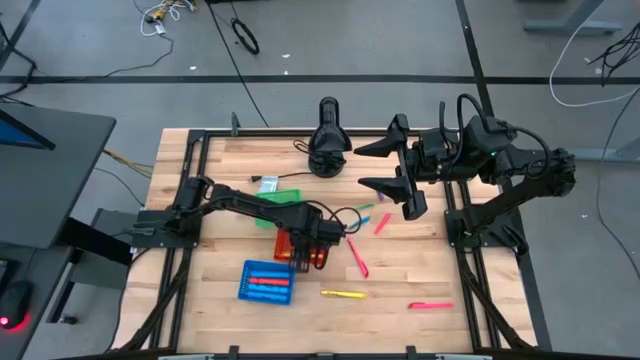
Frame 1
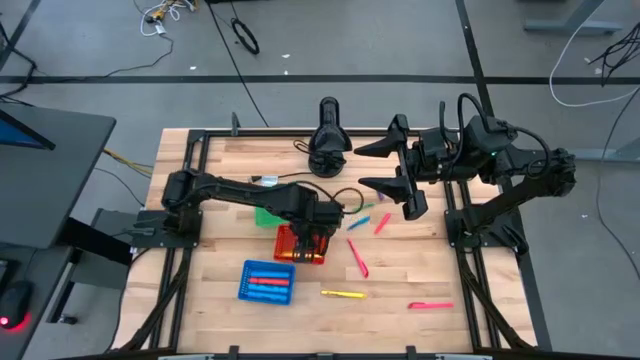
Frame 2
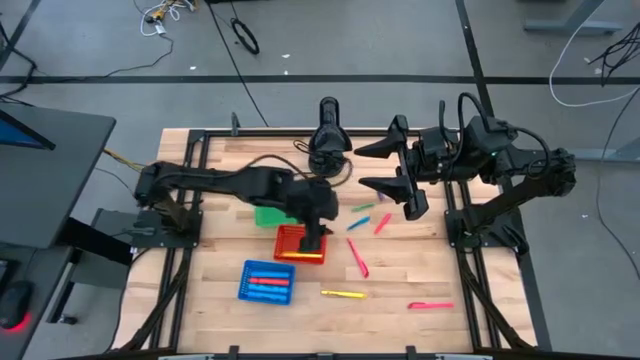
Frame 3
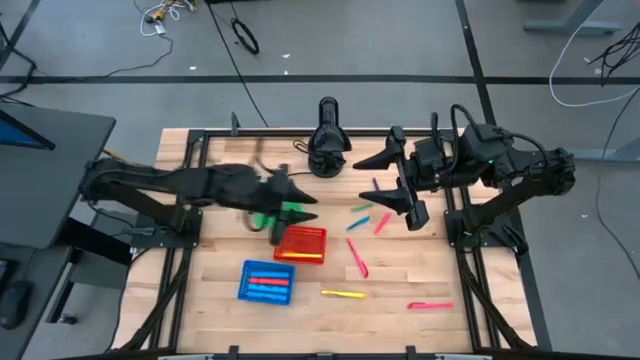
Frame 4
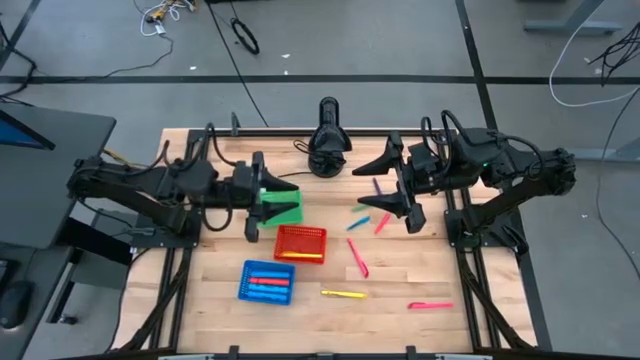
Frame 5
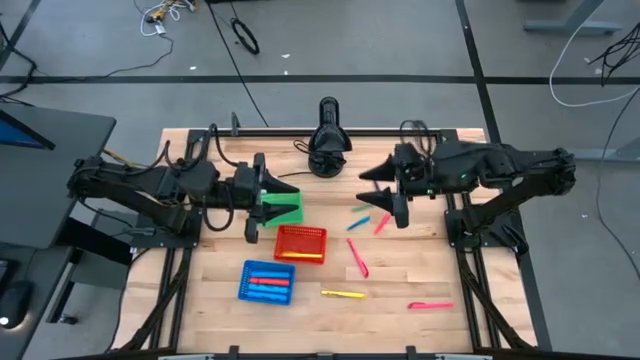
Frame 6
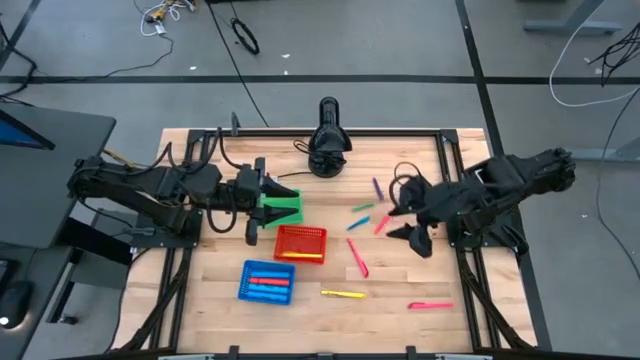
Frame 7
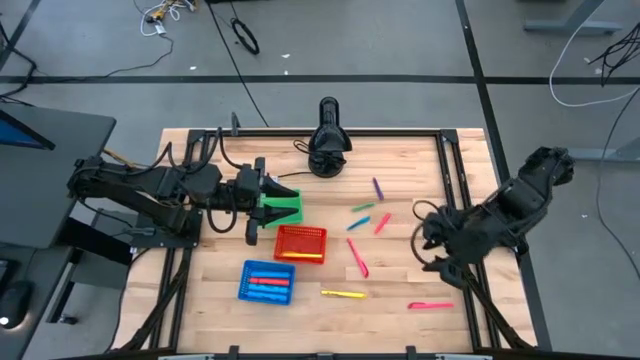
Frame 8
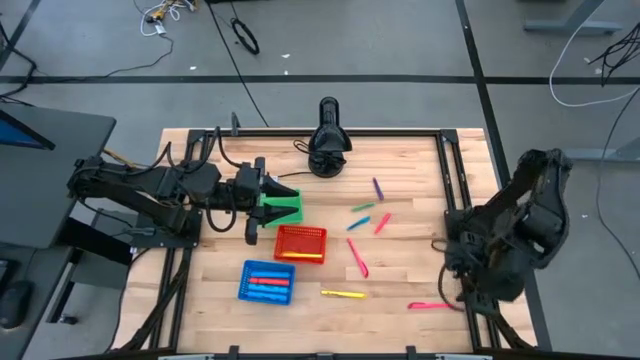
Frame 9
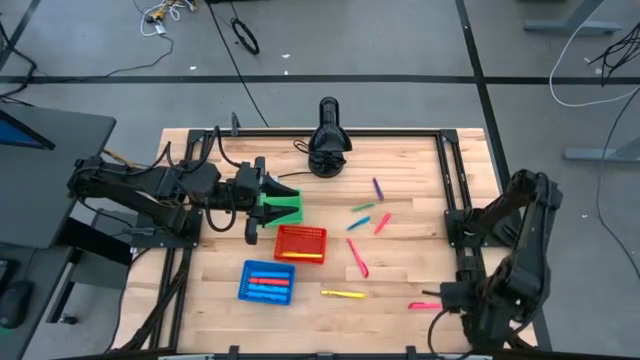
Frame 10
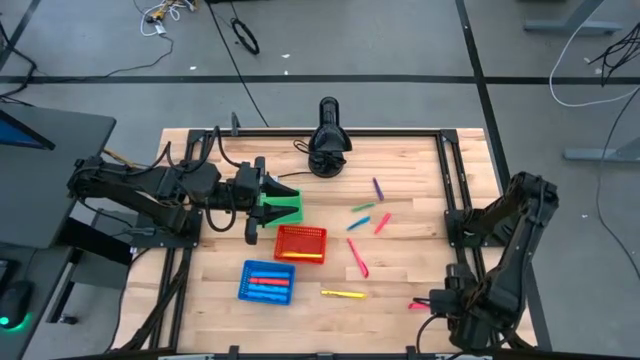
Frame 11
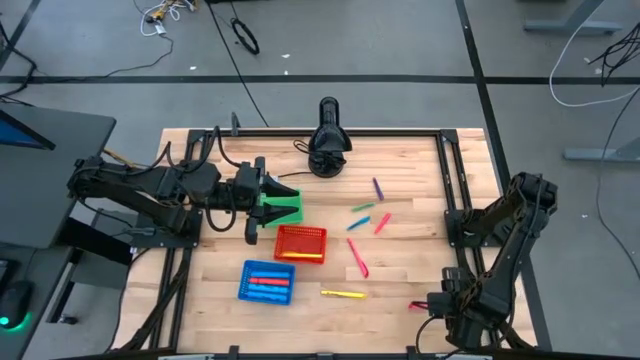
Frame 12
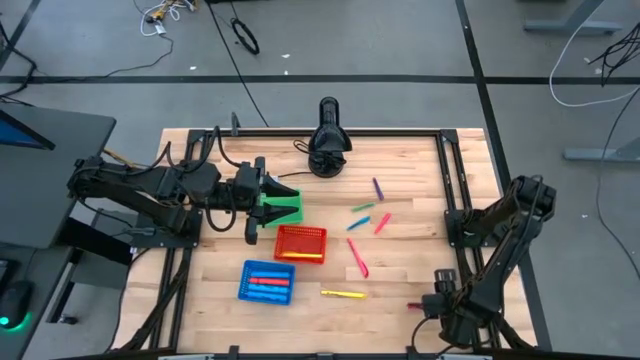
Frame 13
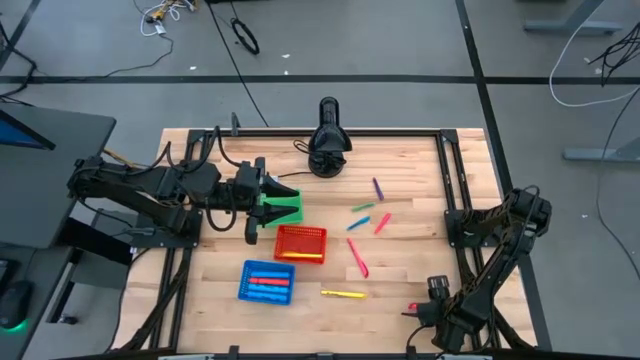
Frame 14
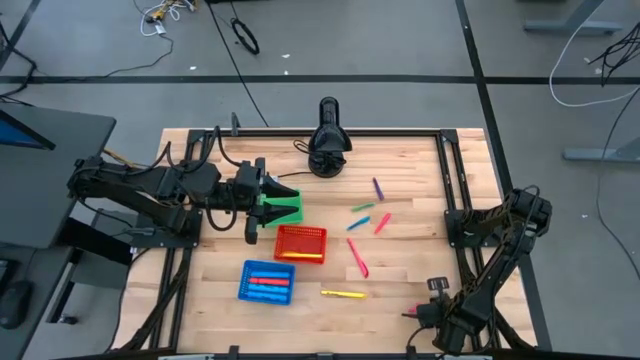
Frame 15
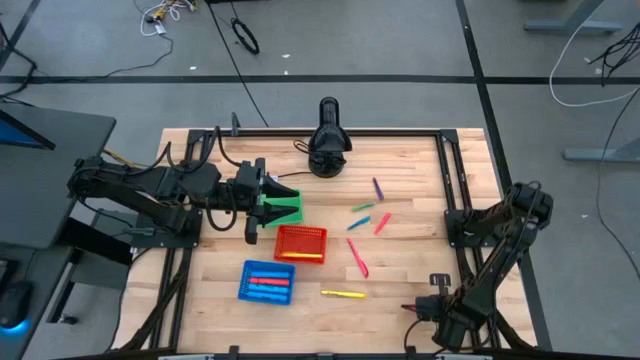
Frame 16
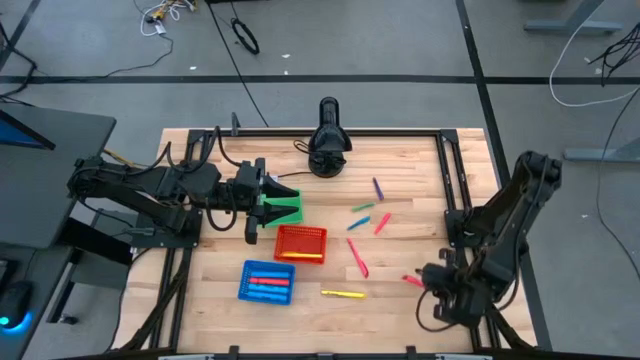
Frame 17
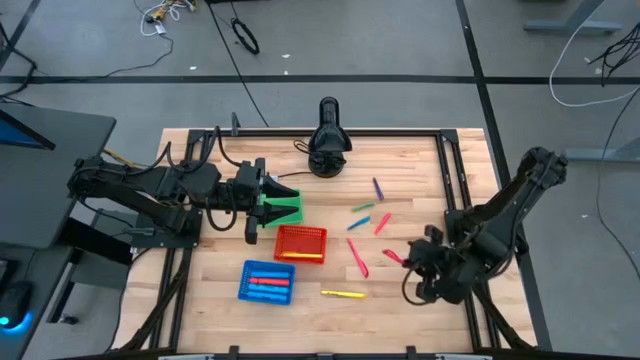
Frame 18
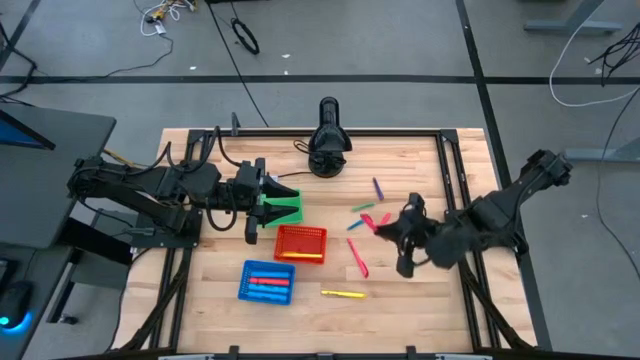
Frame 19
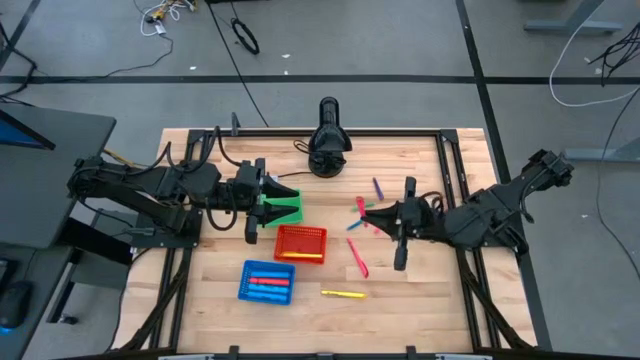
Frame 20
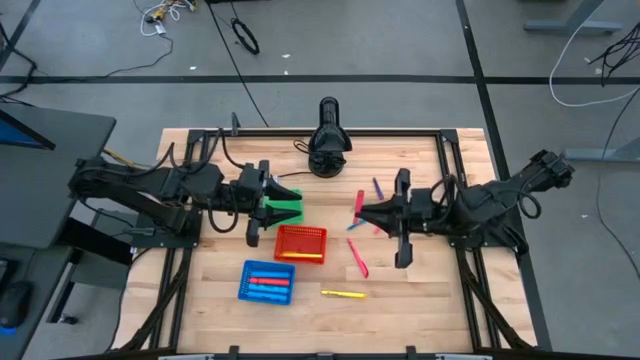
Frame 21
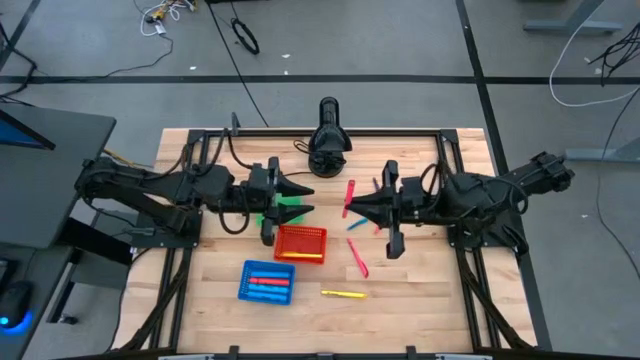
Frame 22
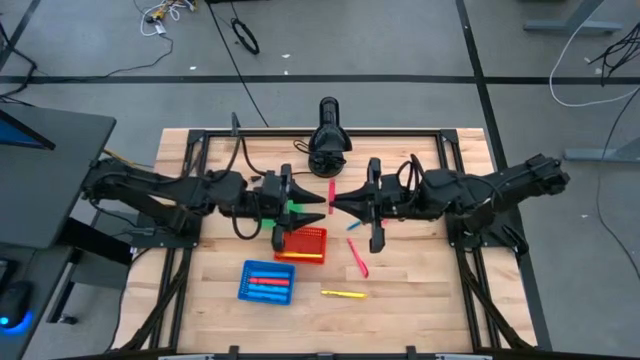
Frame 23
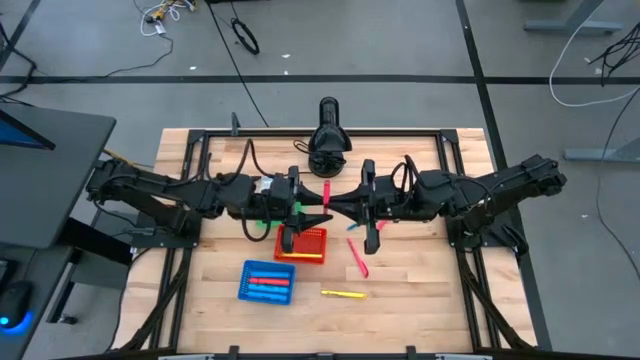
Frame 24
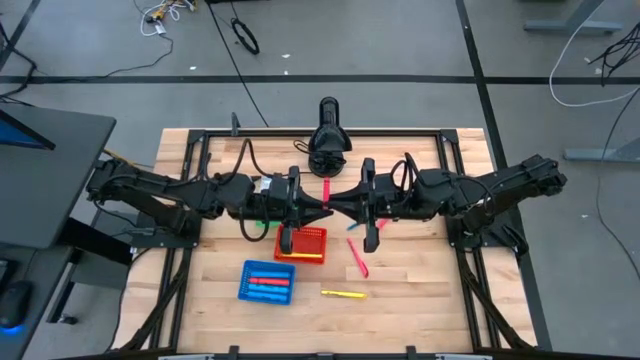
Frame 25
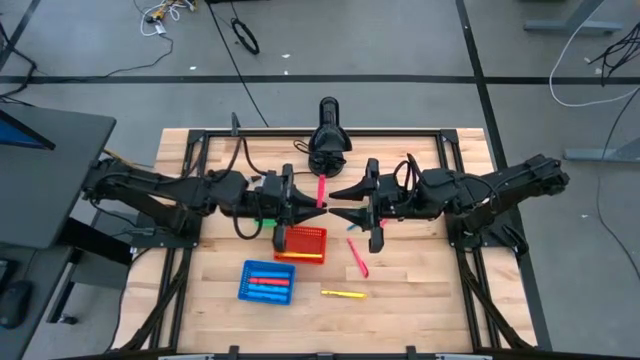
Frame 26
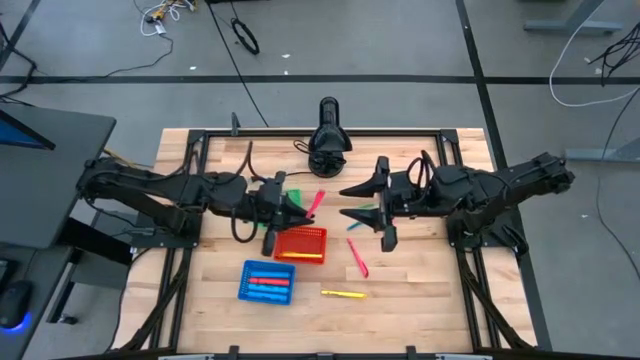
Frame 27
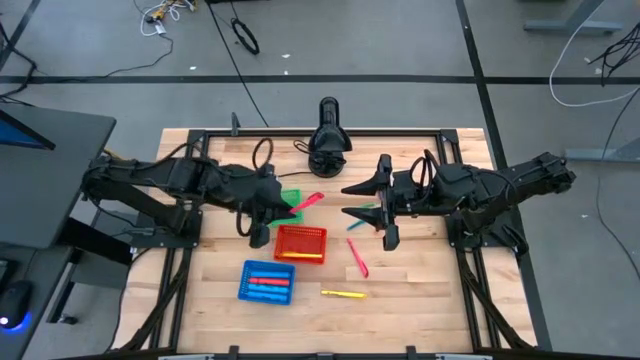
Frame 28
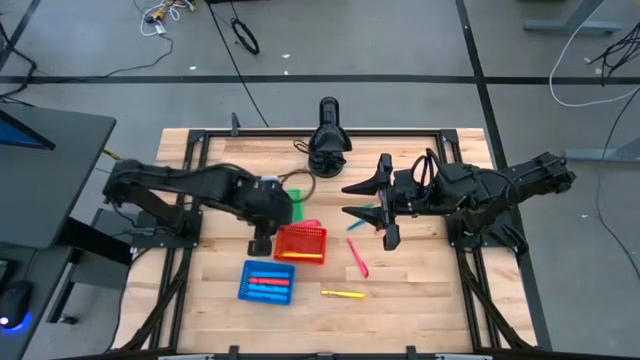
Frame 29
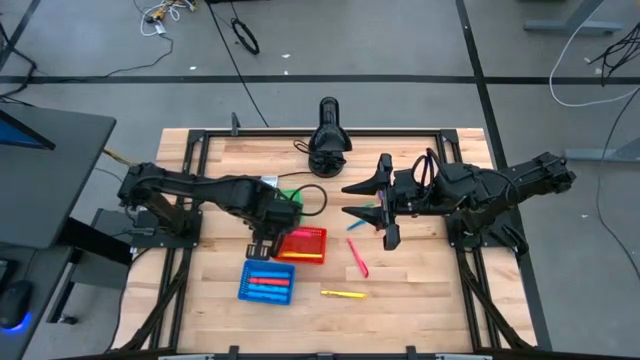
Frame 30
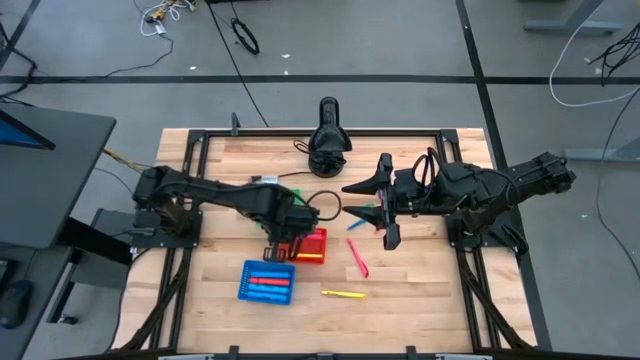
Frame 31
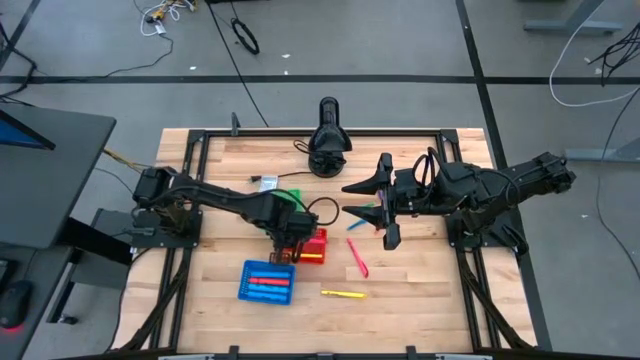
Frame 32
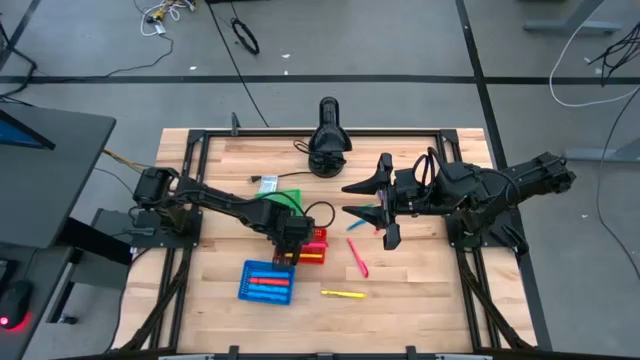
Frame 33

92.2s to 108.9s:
Task: Pick & Place Markers
Put the bottom pink marker pen into the red bin

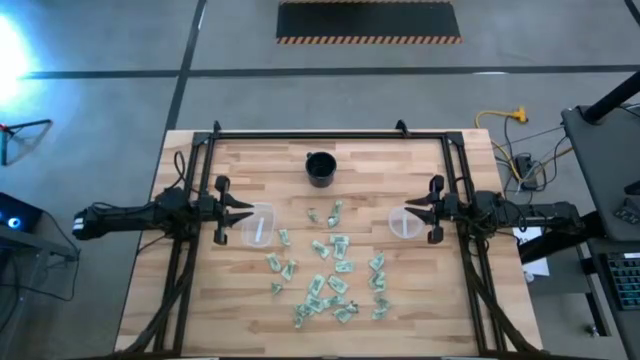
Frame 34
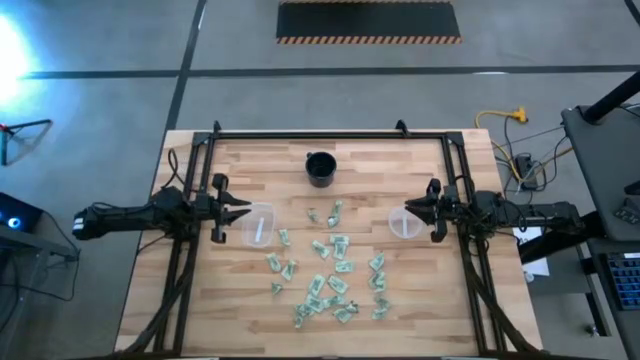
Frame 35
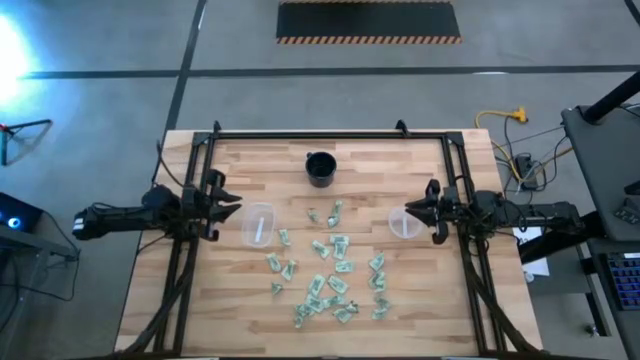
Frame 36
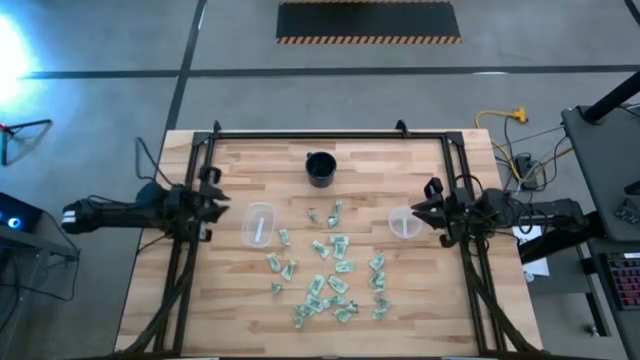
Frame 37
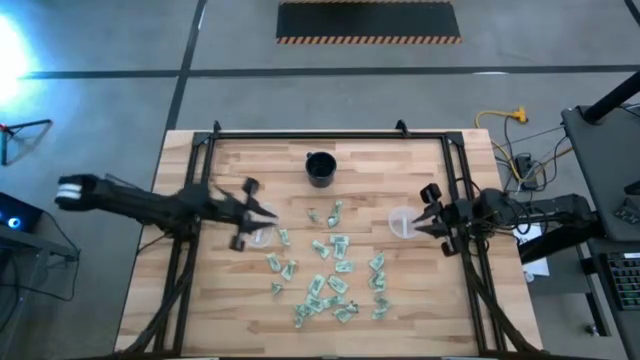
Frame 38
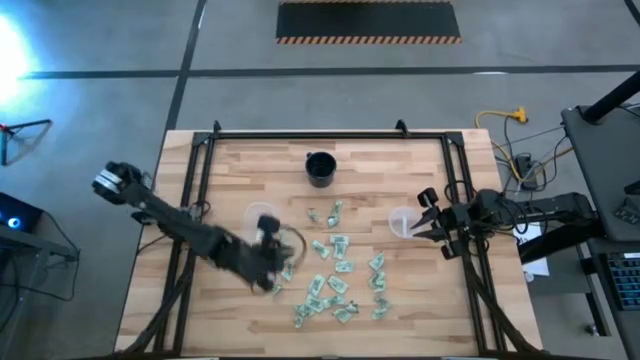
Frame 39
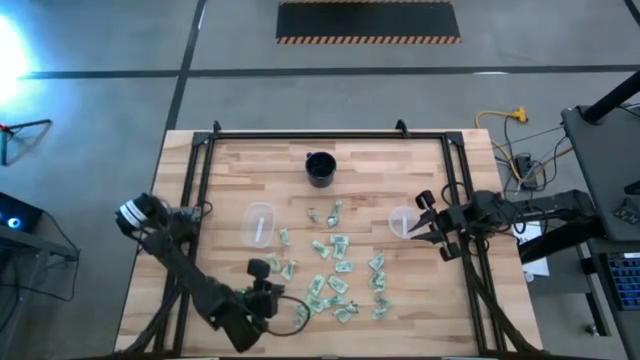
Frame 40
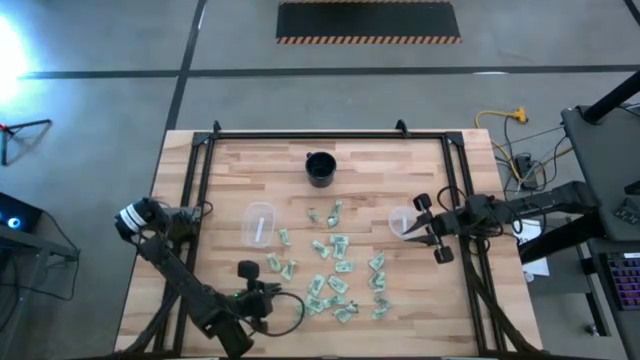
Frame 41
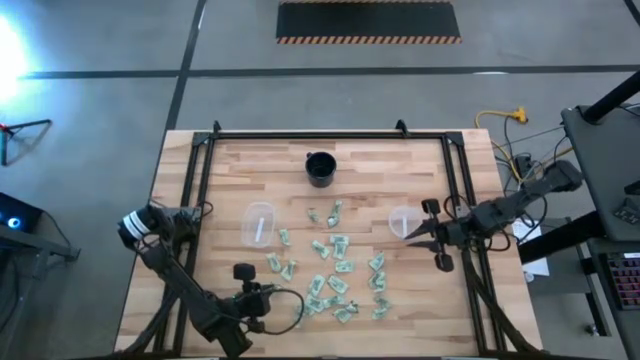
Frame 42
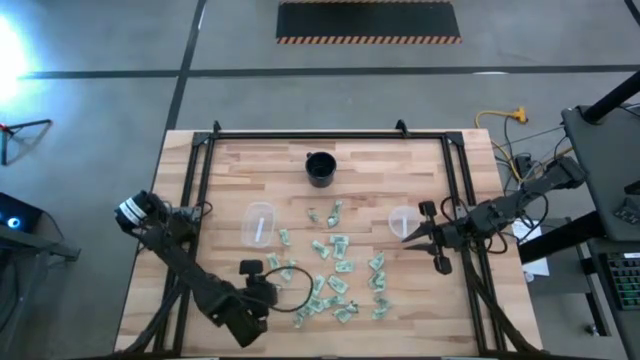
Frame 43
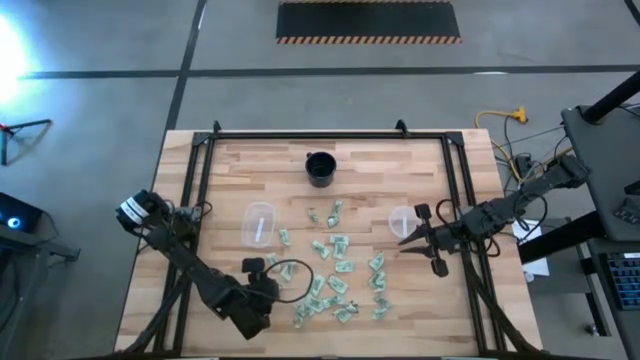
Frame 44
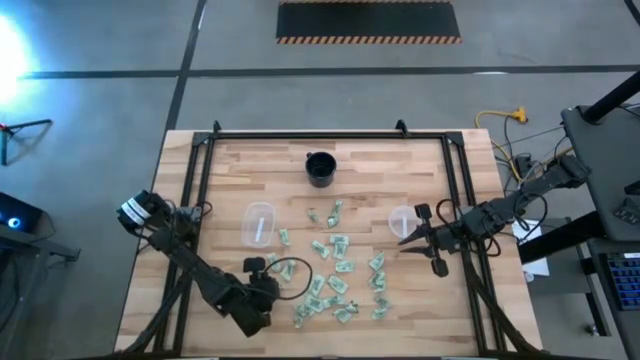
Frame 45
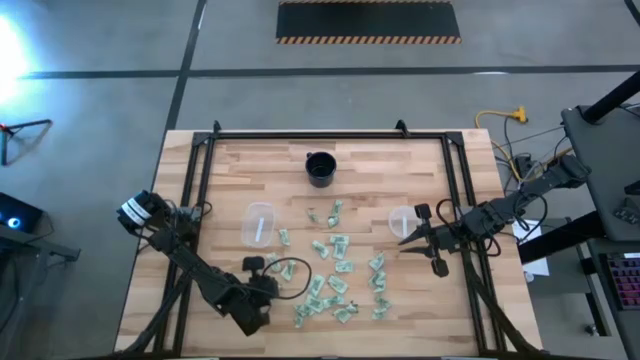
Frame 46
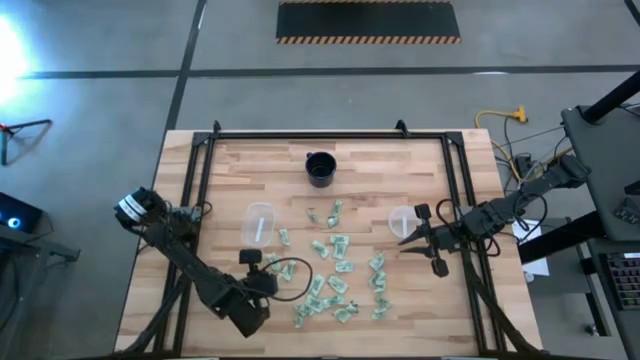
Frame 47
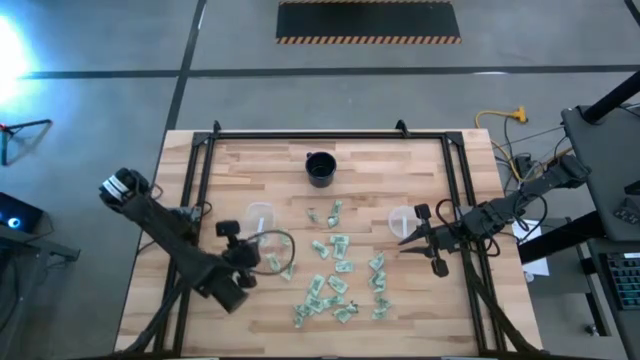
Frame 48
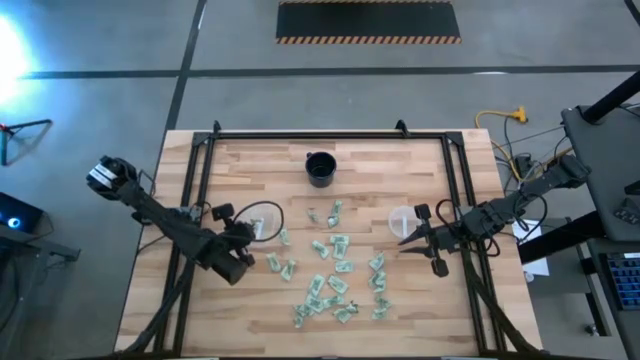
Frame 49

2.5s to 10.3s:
Task: Pick and place Stevia / Truvia into bins
Put the light green stevia packet into the rectangular container
